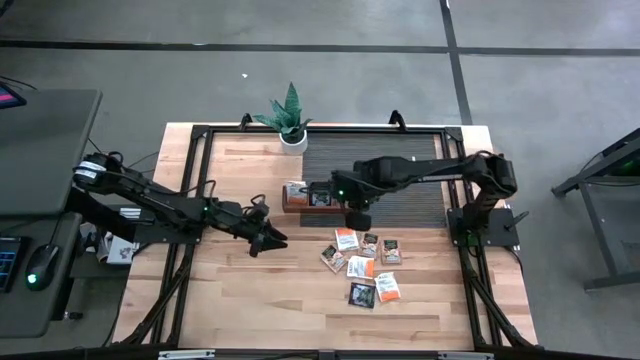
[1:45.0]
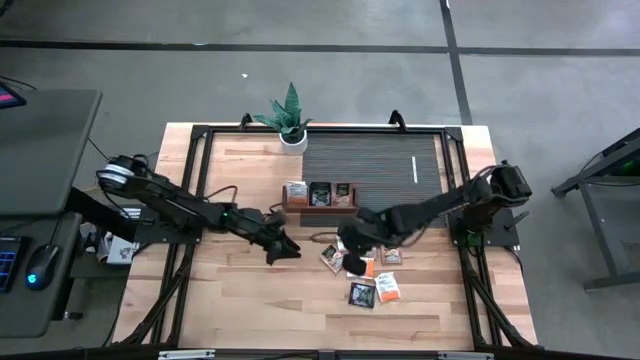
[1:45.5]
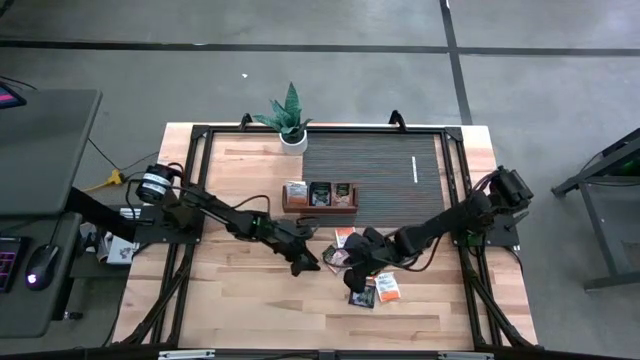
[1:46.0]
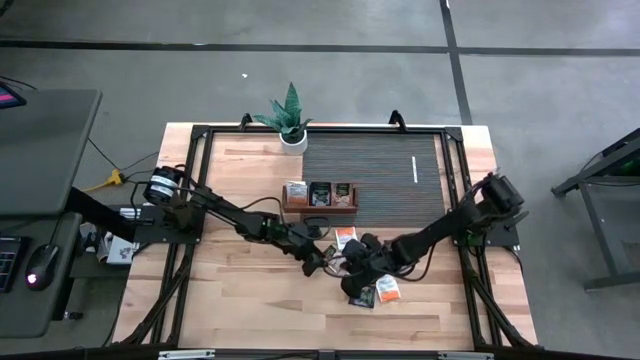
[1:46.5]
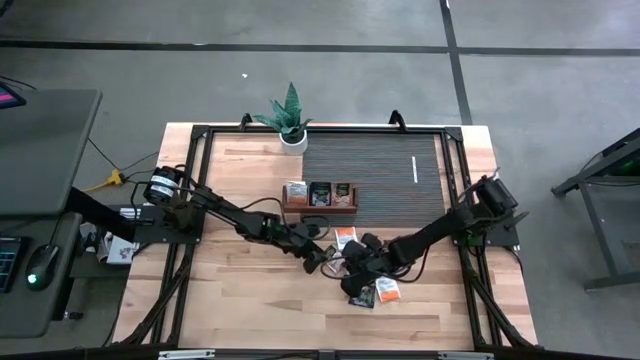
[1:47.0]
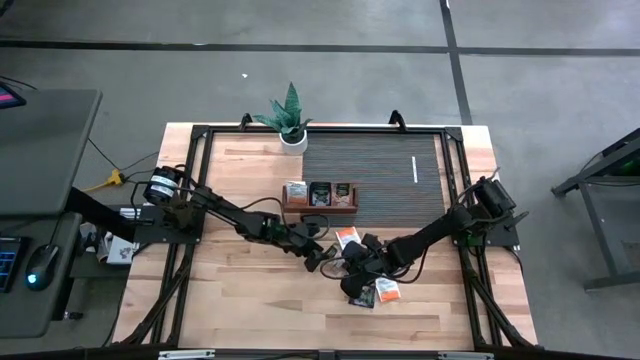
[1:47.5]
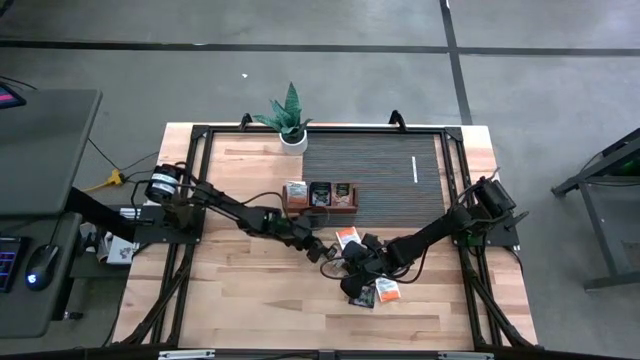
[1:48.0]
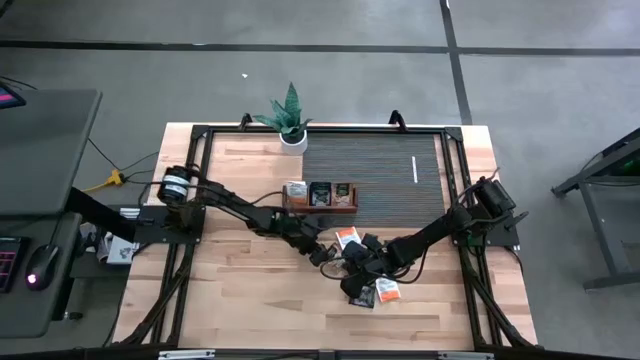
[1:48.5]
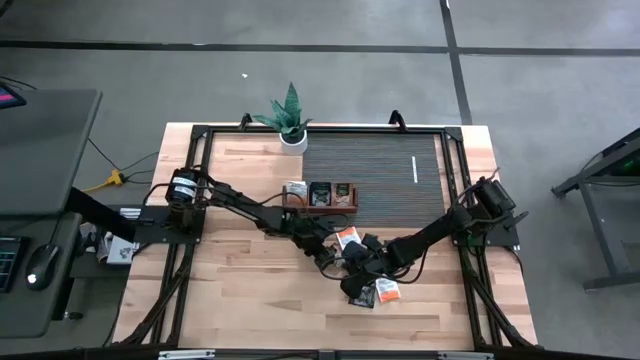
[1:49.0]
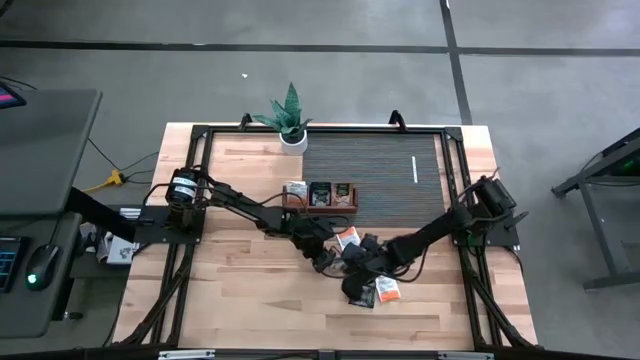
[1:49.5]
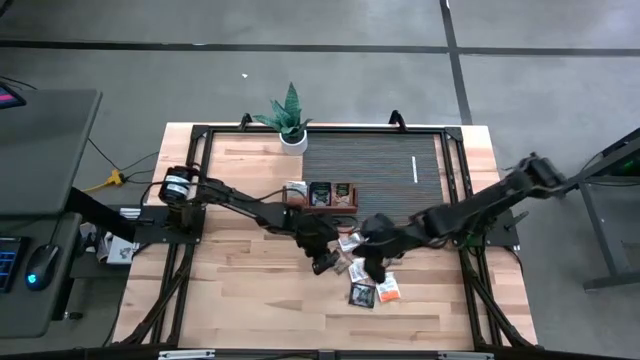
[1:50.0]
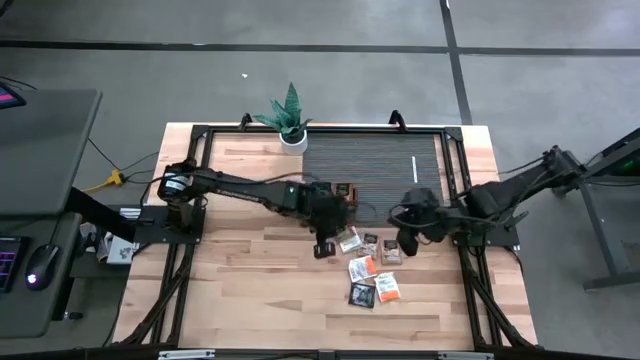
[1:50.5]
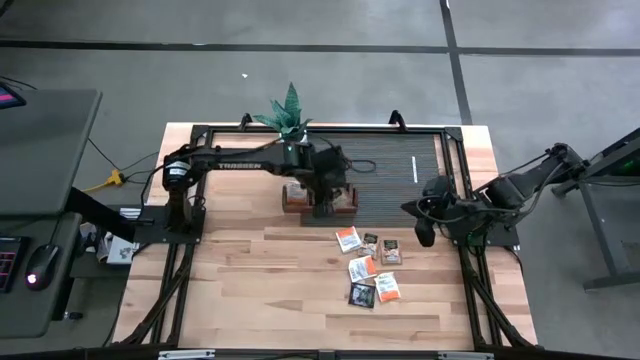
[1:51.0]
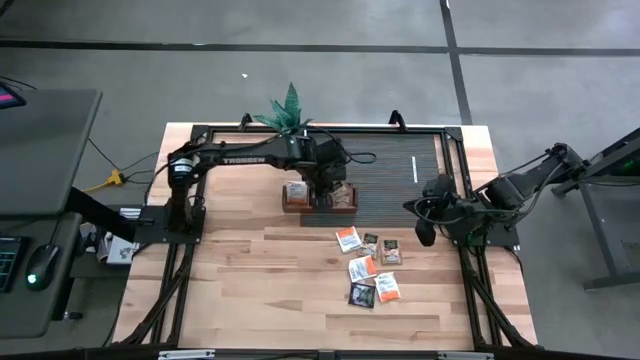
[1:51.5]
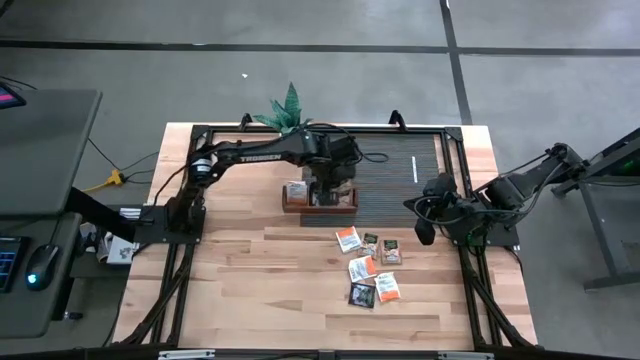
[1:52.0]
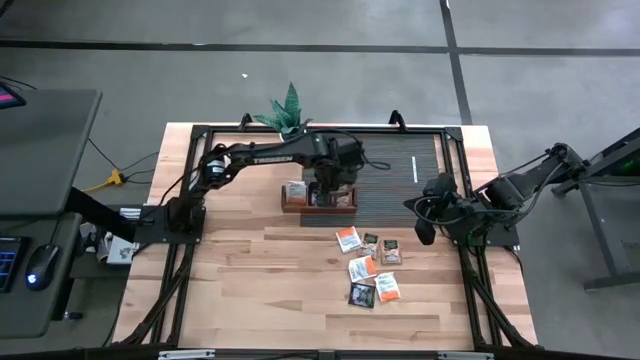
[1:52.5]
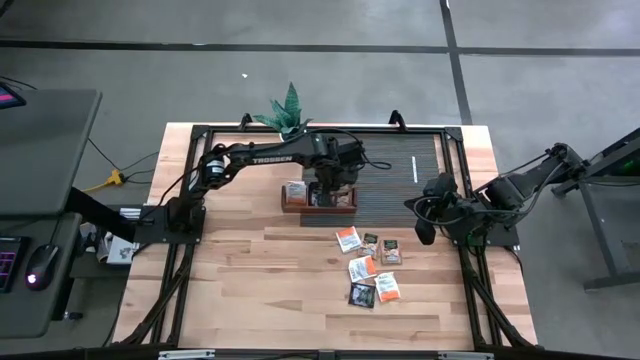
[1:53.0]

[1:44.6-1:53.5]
Task: Pick & Place Tea
Put the brown tea bag into the right section of the wooden organizer

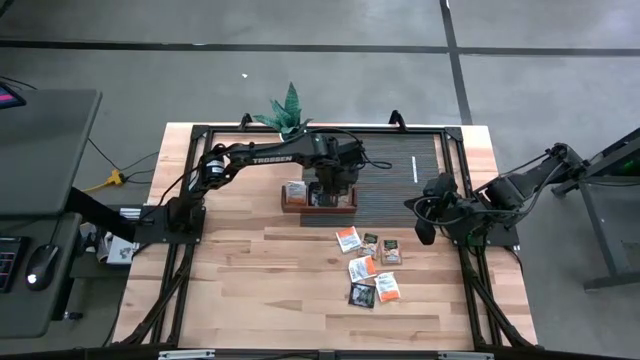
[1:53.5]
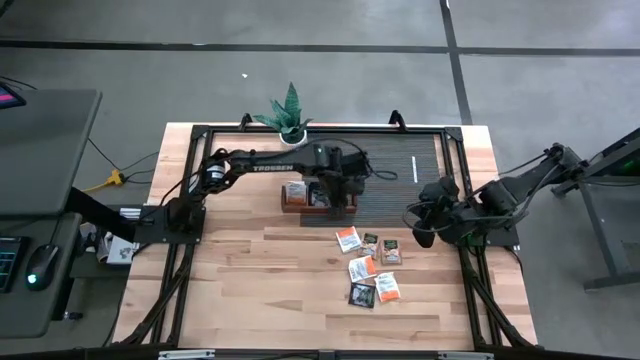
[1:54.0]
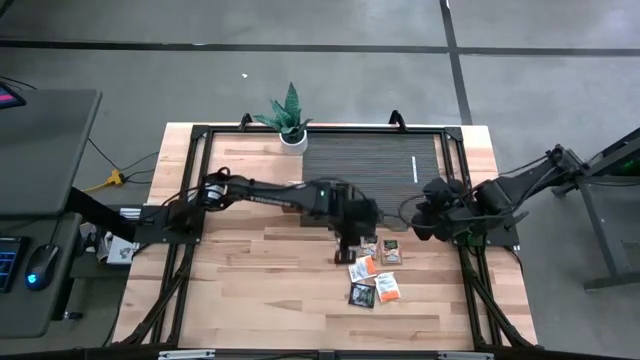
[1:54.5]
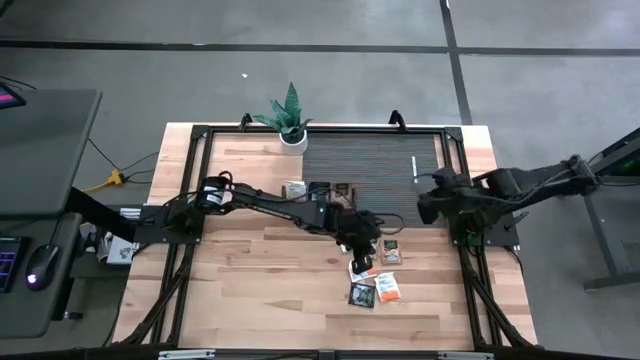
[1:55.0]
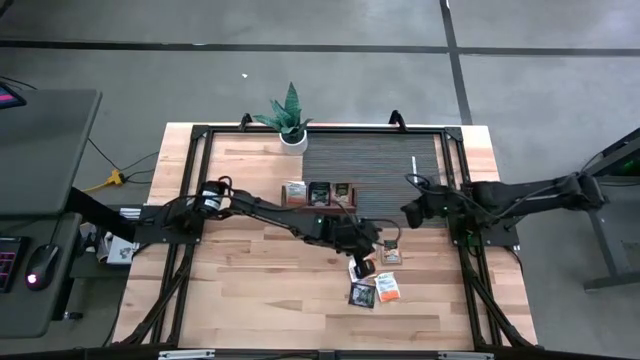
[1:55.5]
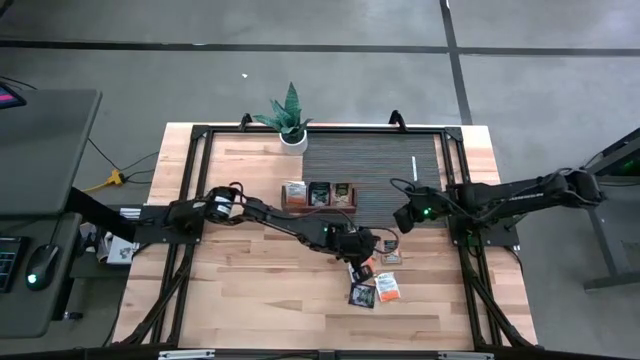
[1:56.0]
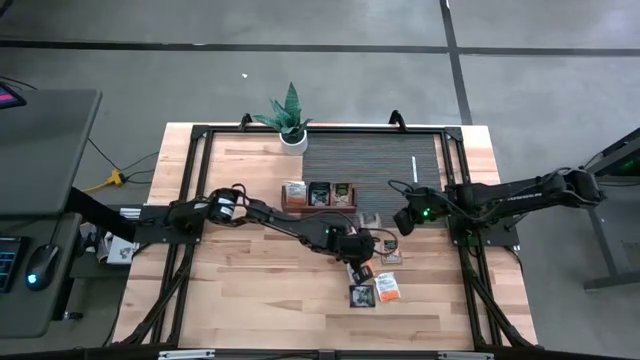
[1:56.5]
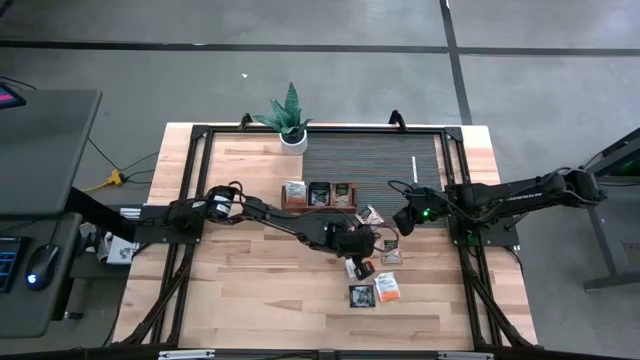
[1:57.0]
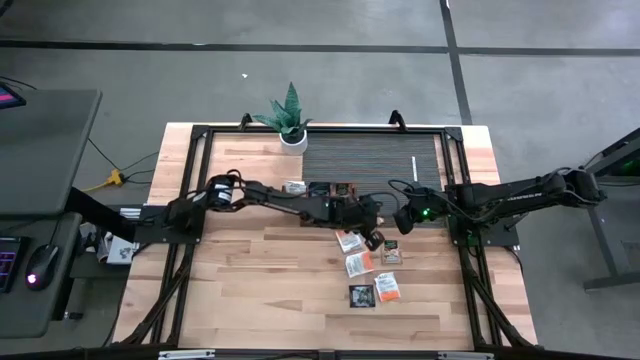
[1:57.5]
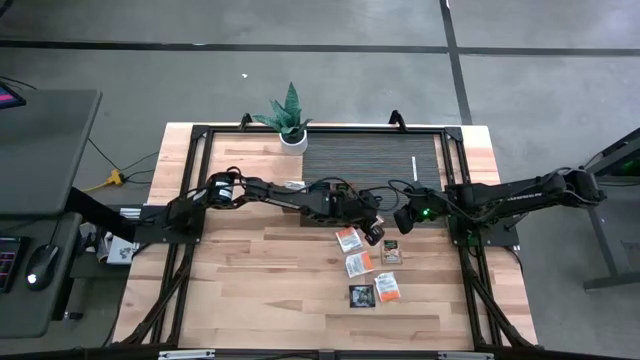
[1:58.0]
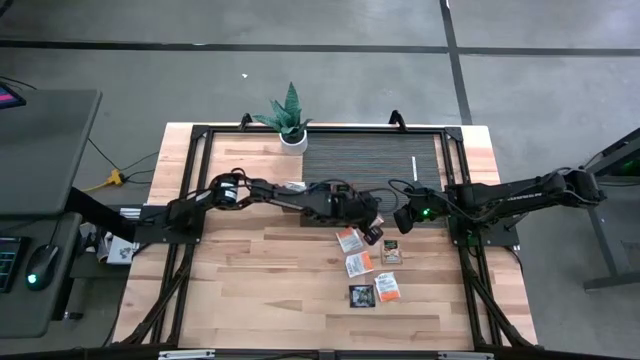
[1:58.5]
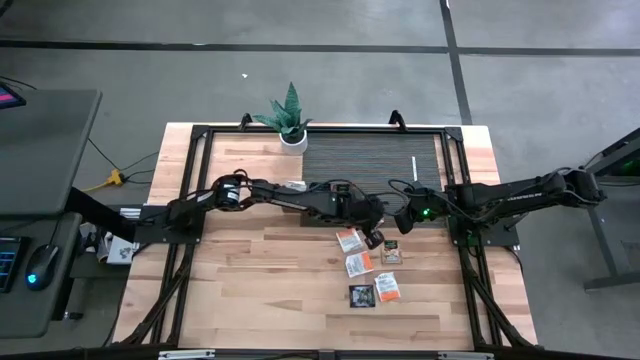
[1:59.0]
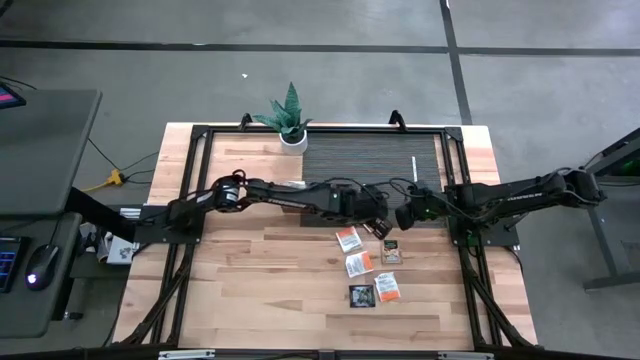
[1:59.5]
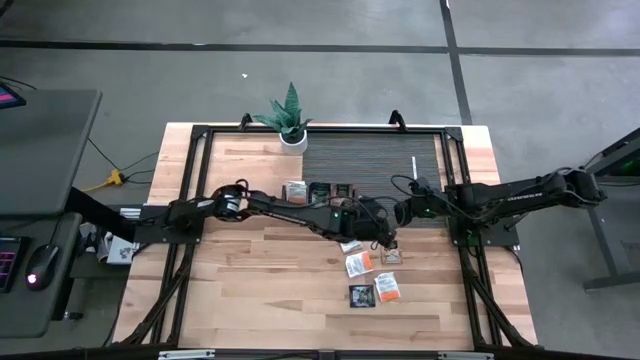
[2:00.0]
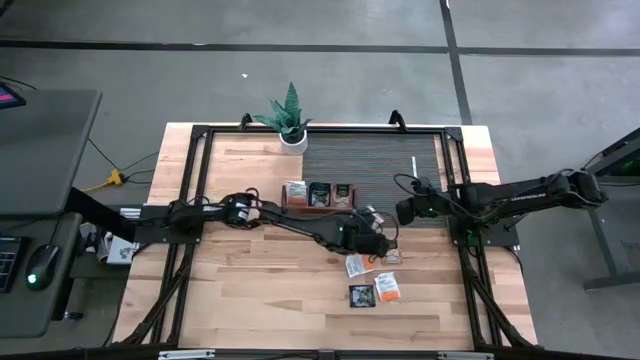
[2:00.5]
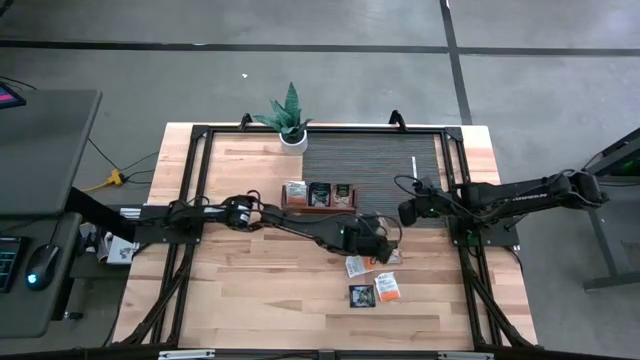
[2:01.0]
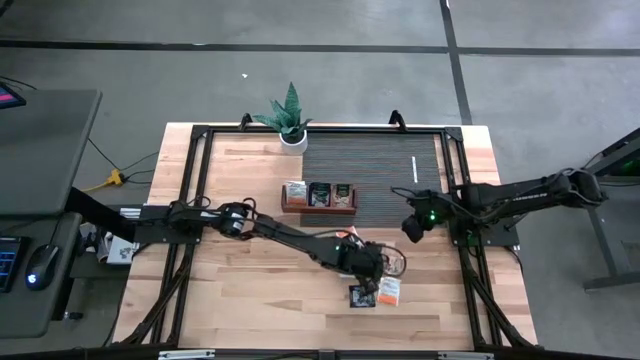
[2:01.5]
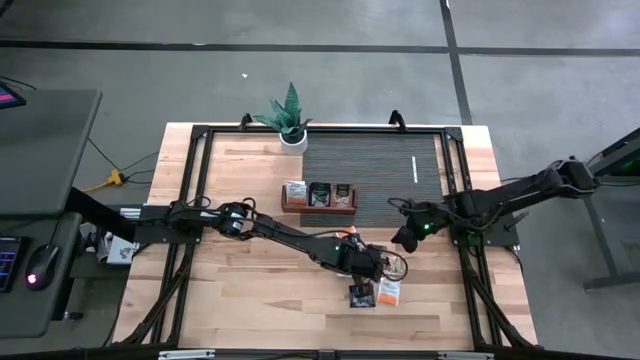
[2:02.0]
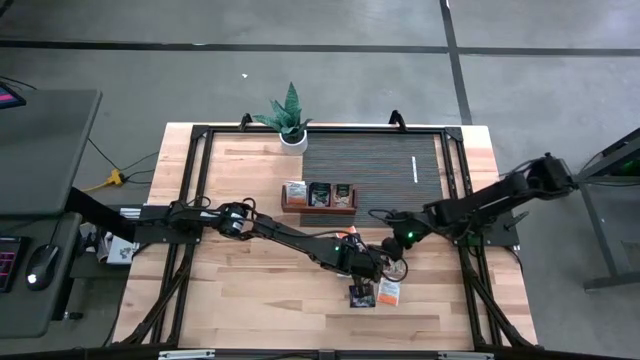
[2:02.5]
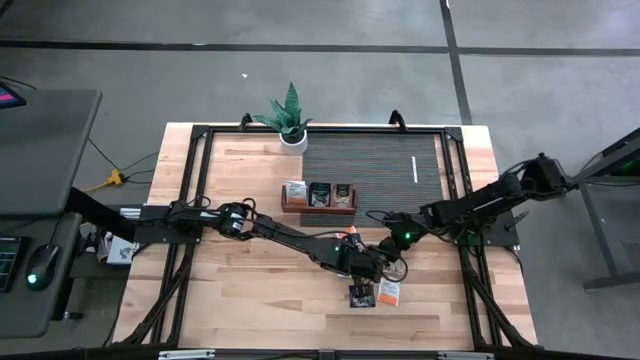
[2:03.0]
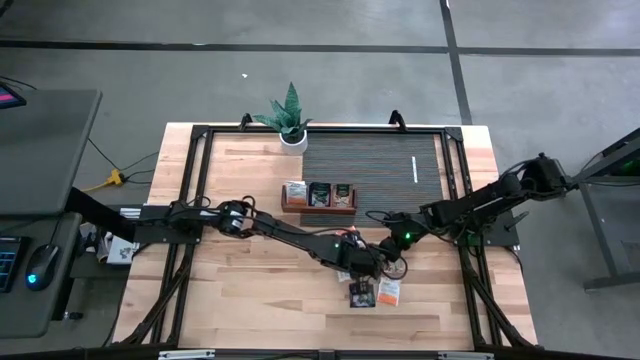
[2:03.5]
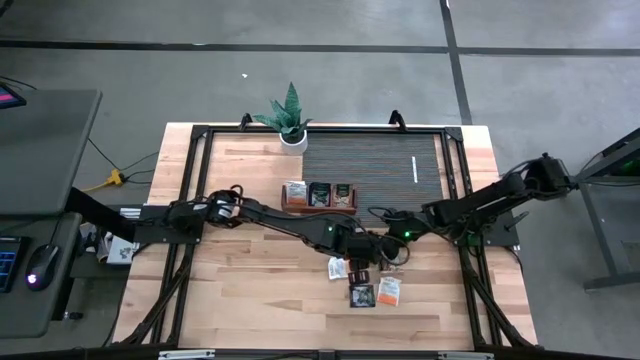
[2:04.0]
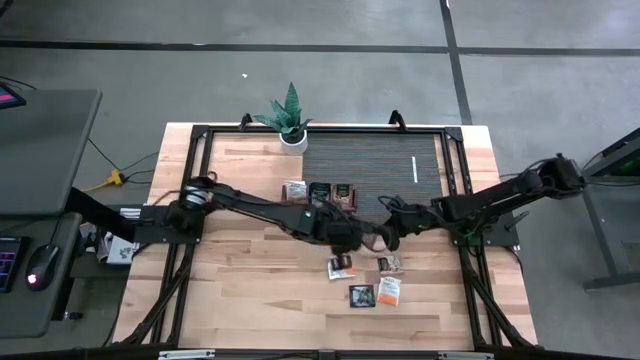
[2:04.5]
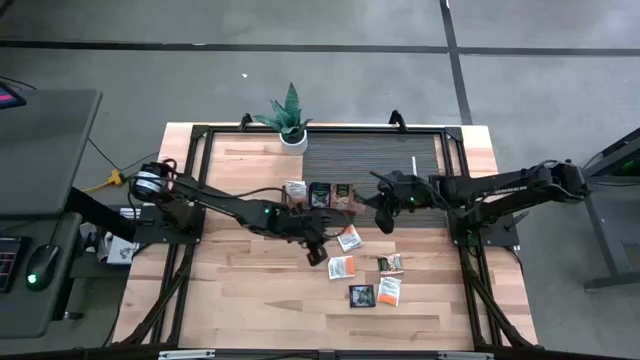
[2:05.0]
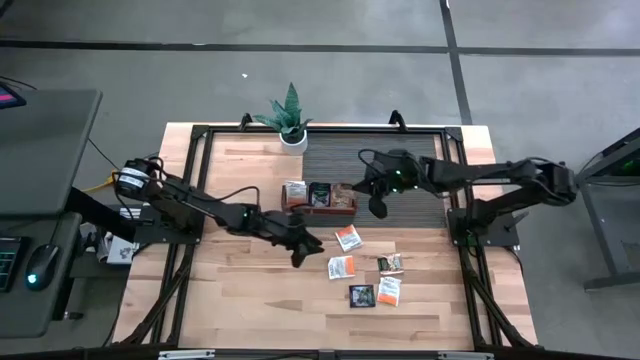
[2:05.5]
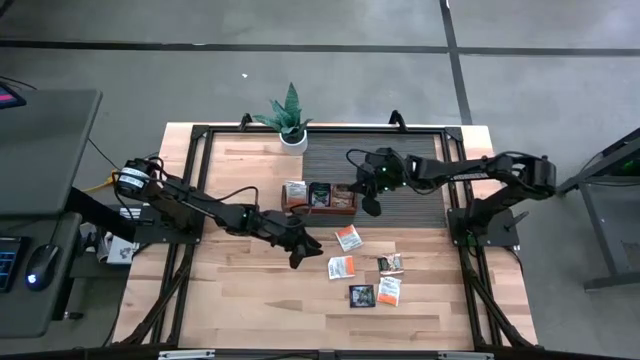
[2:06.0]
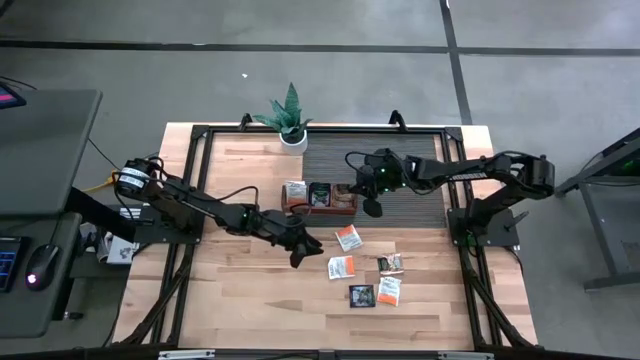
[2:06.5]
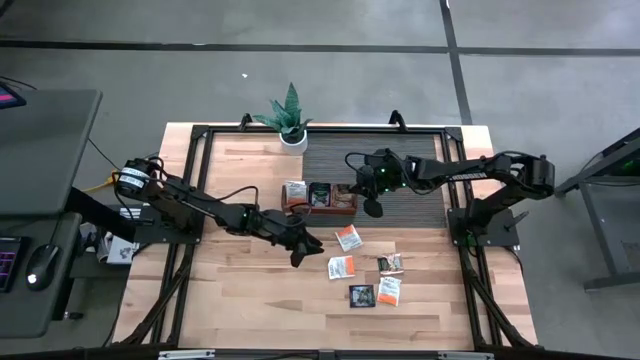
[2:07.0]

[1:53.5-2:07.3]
Put the brown tea bag into the right section of the wooden organizer
